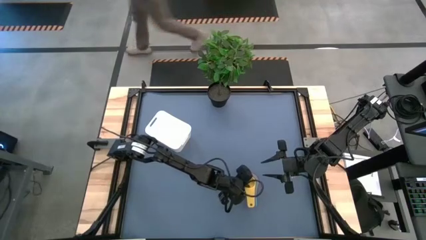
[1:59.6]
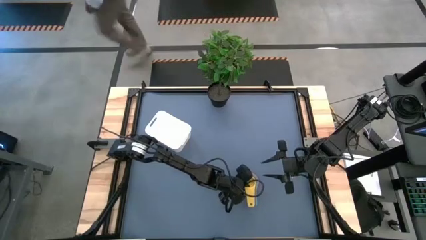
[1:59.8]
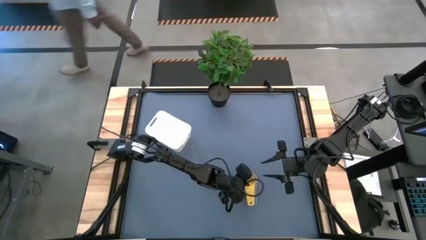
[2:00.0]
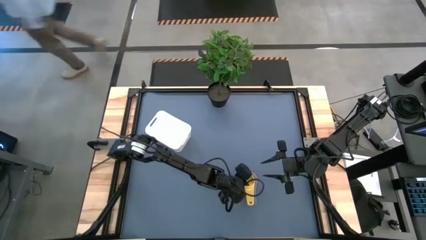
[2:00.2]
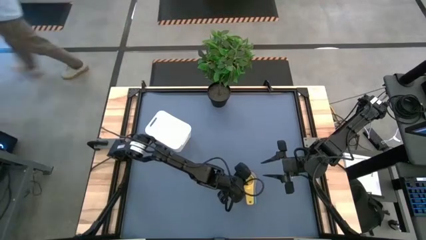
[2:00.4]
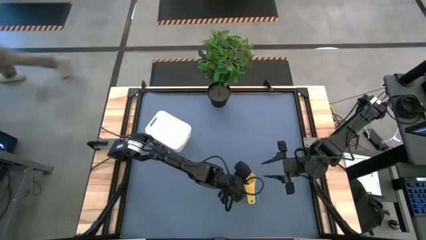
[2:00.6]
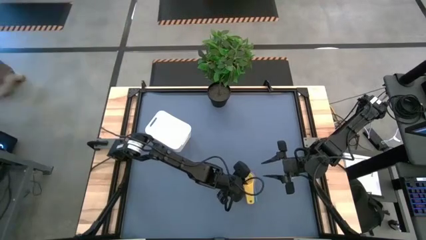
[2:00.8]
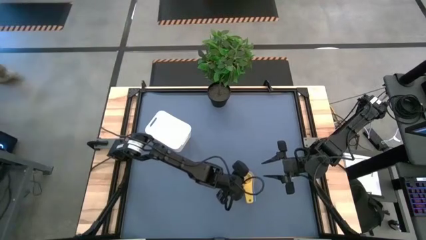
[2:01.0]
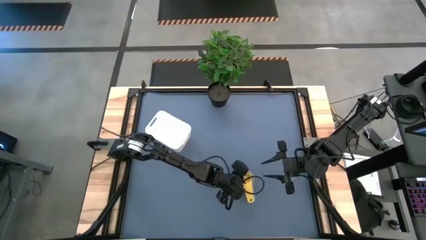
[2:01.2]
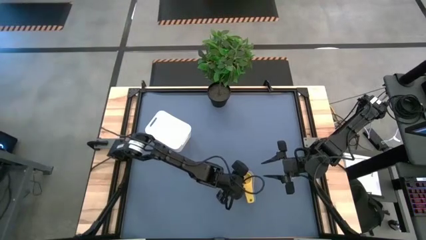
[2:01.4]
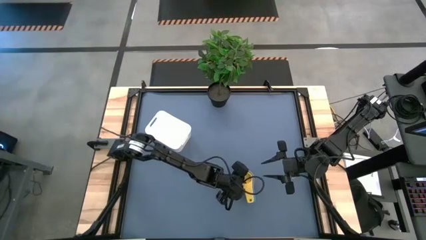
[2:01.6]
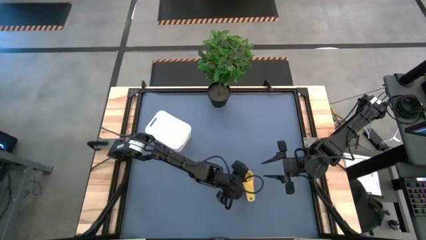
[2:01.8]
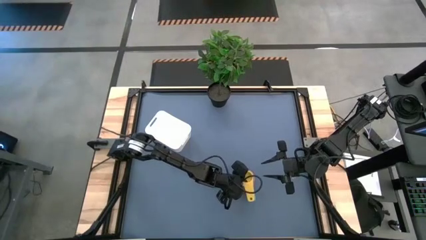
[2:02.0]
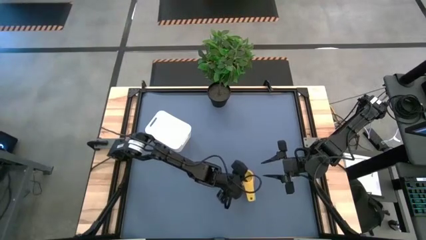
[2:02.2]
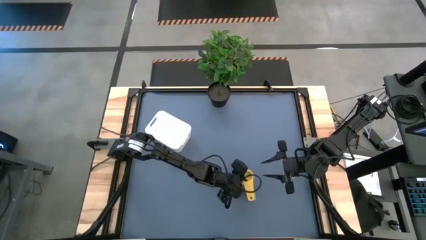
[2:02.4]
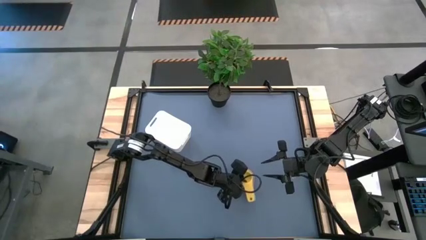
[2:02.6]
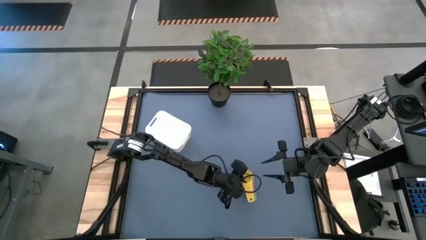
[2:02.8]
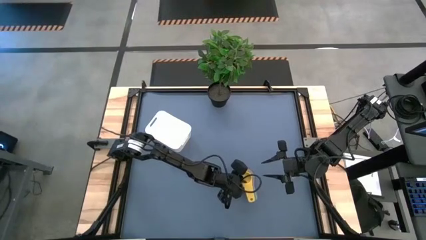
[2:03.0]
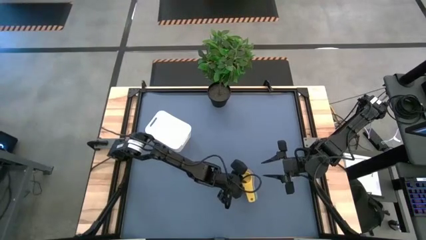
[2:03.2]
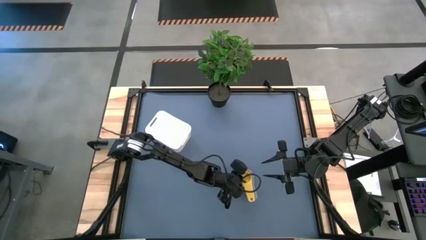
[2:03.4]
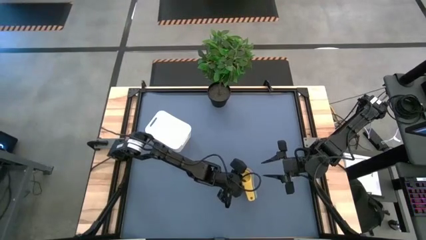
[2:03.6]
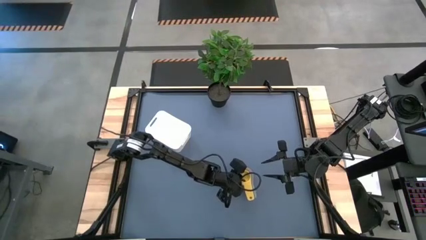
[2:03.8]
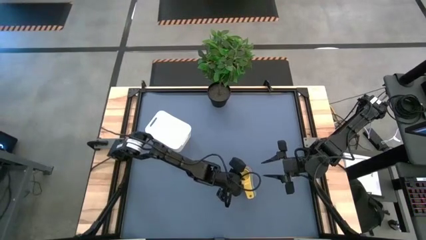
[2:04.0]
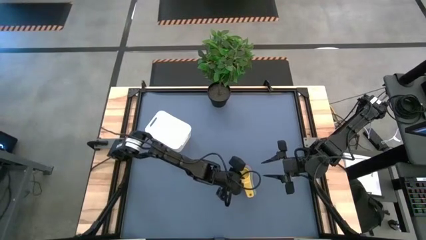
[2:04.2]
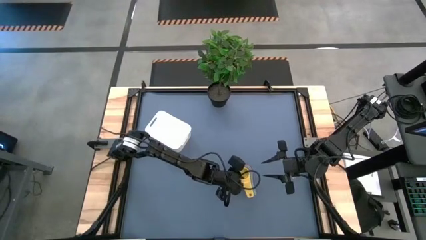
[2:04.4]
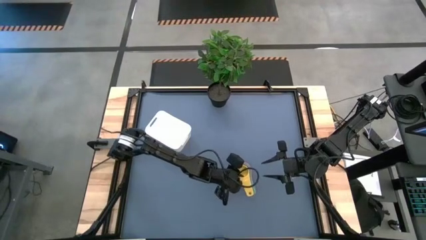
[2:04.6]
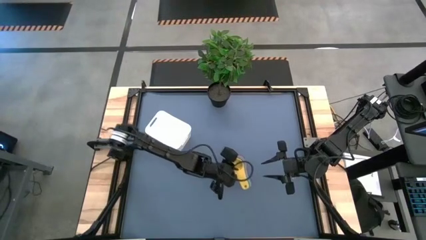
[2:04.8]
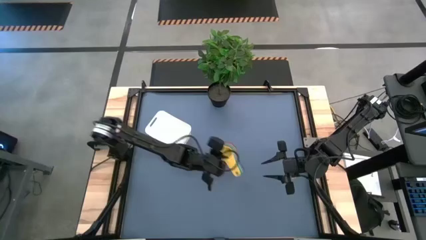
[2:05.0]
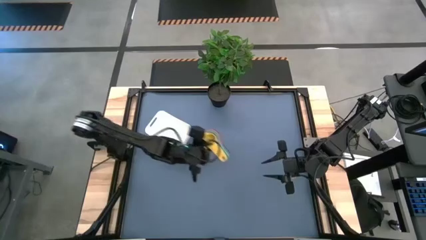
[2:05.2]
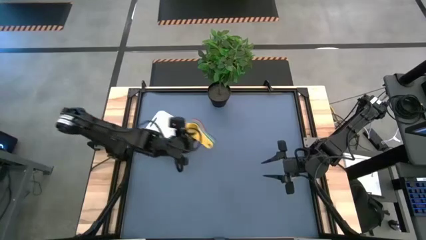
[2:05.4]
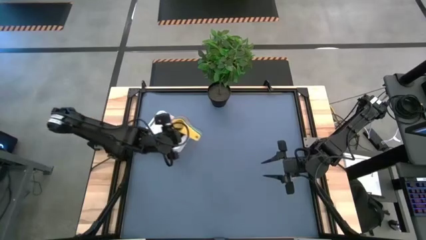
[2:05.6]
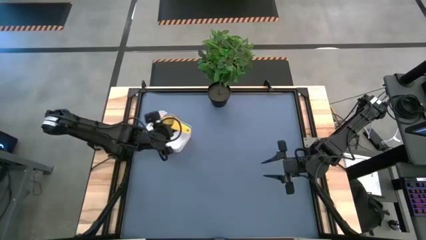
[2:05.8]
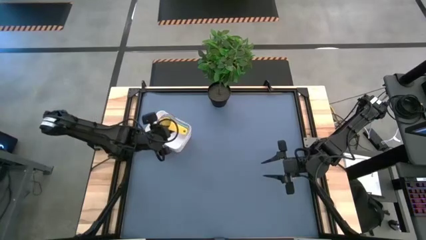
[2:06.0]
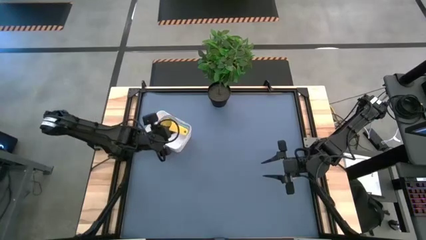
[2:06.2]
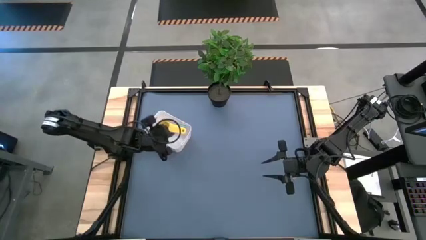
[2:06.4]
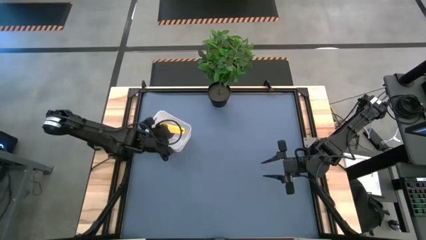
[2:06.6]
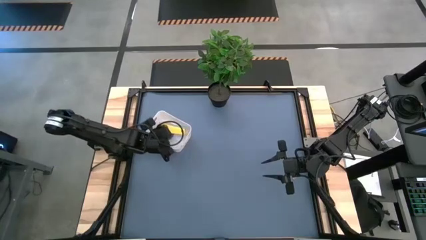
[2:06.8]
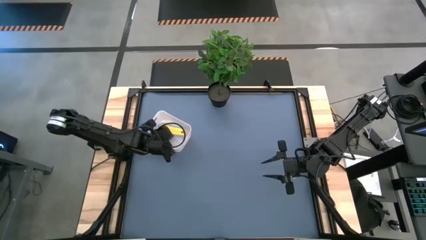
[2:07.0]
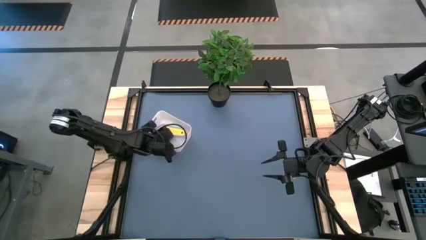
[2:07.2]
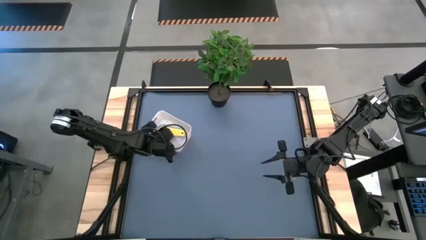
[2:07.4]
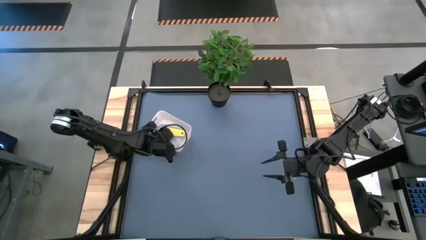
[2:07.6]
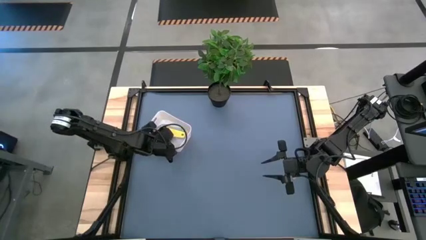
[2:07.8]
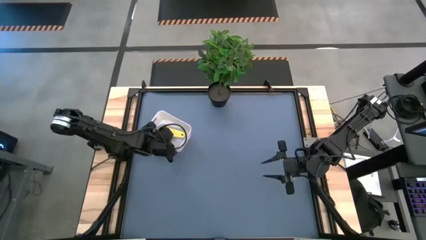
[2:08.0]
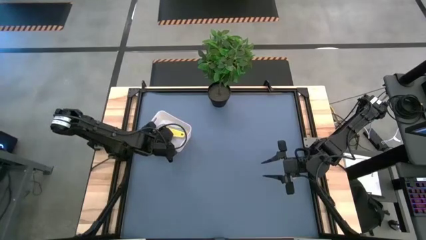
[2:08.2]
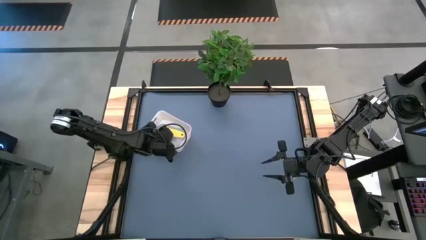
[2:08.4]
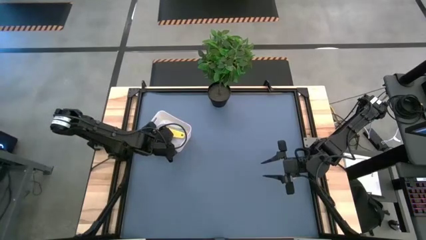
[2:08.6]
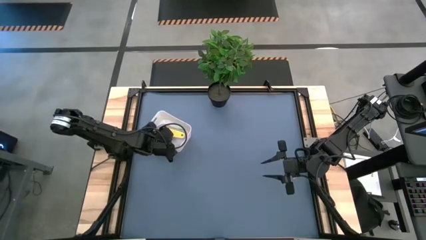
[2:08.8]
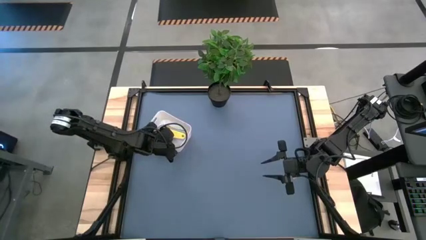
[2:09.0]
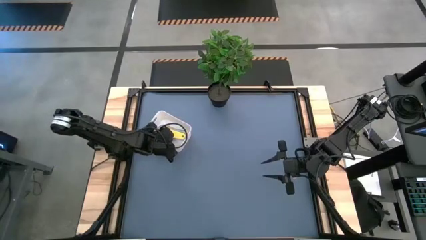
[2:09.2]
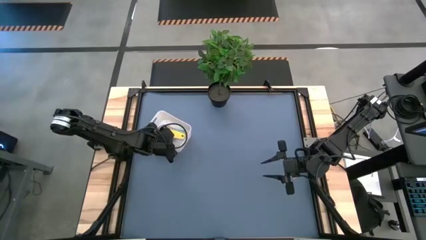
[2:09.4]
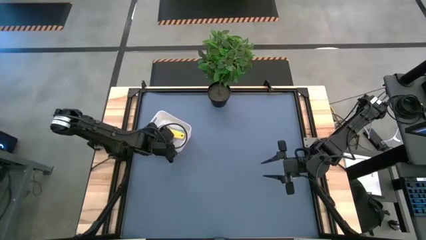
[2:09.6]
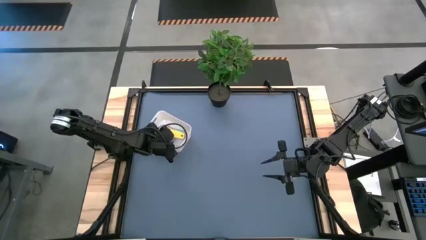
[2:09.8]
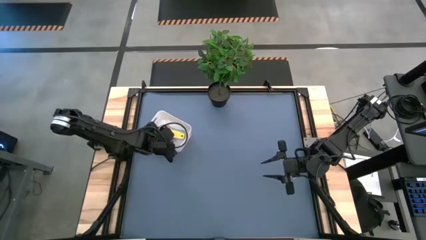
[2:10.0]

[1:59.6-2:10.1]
Task: Nest measuring cups in basket
Put the measuring cups into the white bin

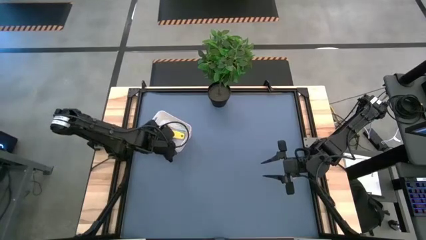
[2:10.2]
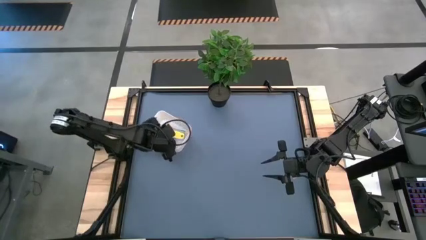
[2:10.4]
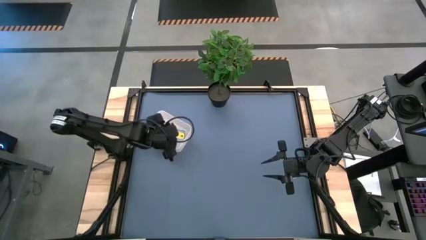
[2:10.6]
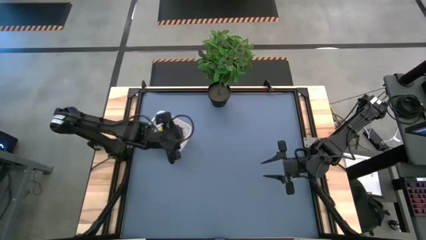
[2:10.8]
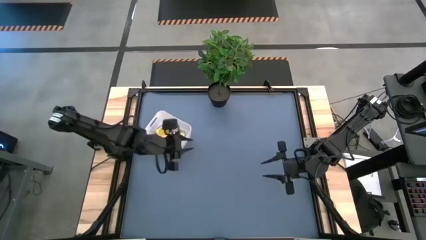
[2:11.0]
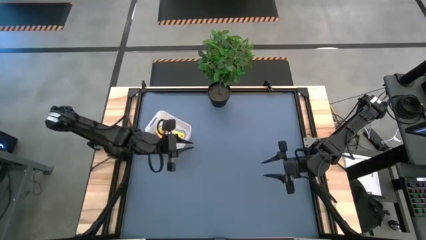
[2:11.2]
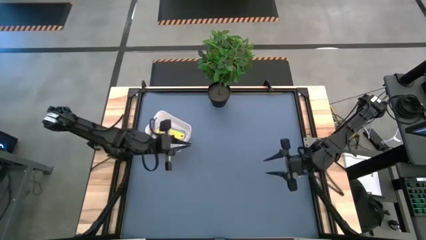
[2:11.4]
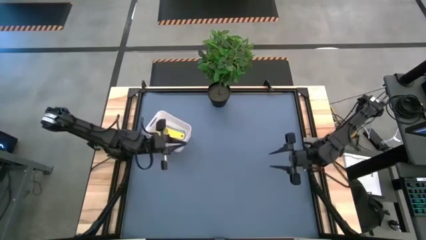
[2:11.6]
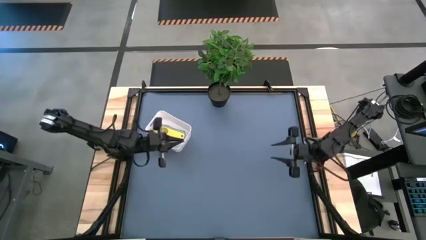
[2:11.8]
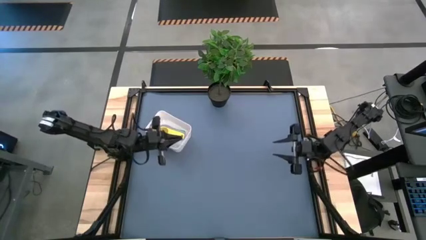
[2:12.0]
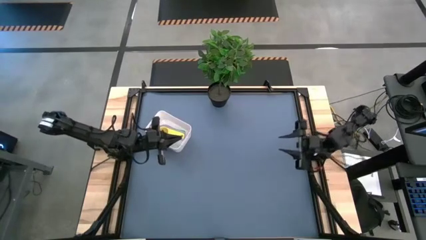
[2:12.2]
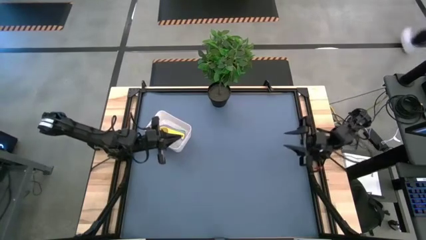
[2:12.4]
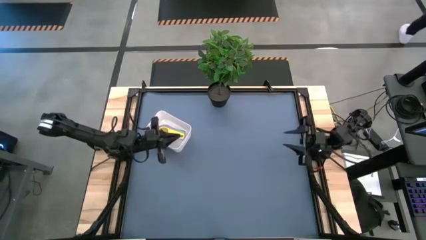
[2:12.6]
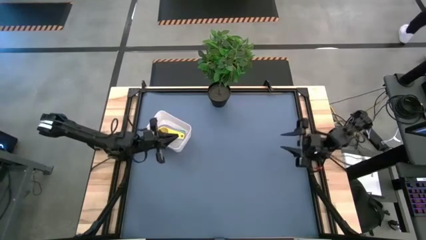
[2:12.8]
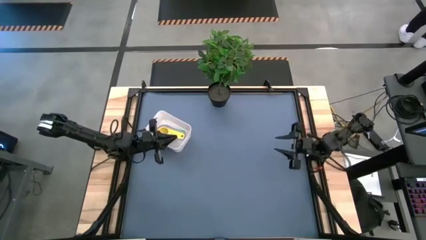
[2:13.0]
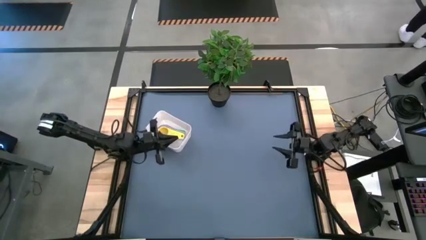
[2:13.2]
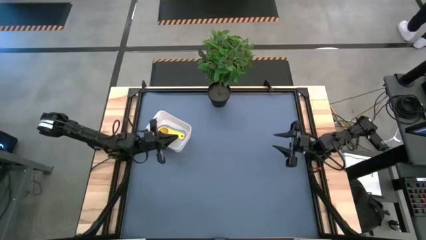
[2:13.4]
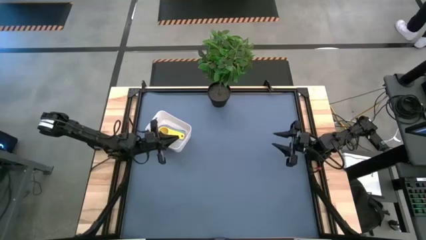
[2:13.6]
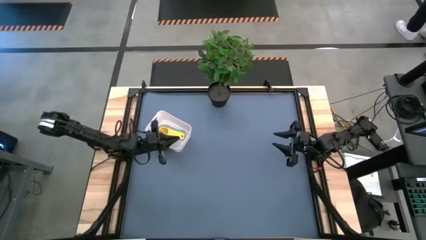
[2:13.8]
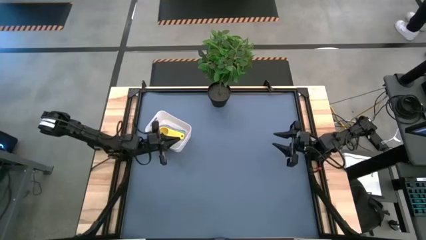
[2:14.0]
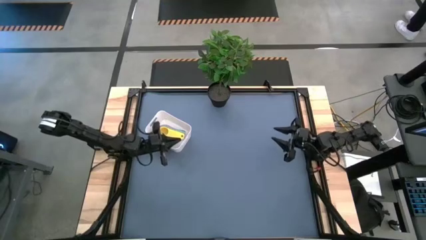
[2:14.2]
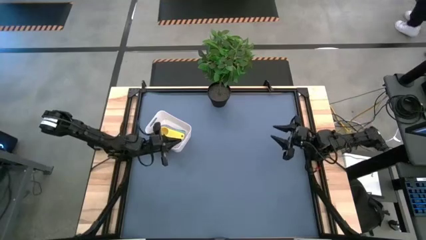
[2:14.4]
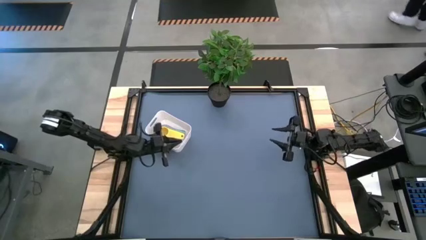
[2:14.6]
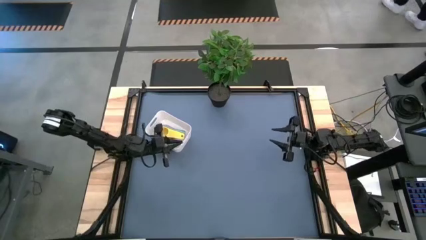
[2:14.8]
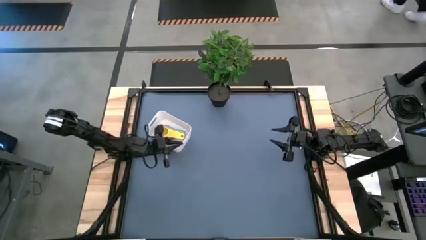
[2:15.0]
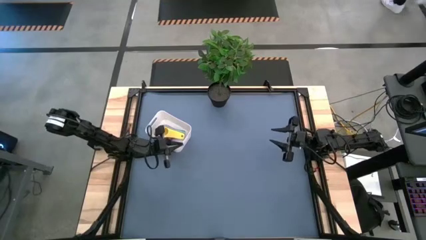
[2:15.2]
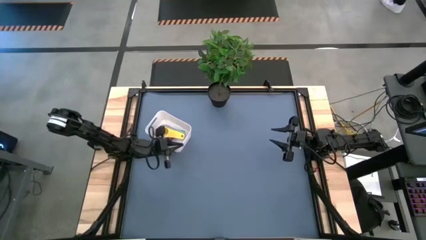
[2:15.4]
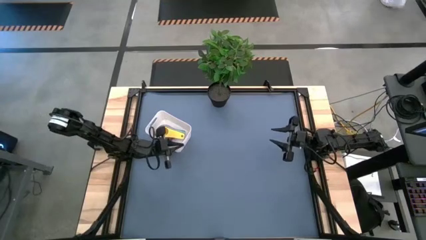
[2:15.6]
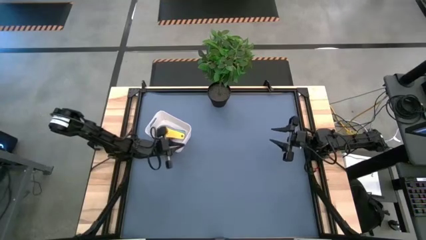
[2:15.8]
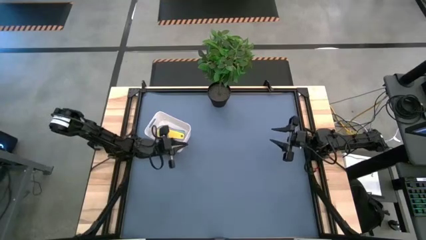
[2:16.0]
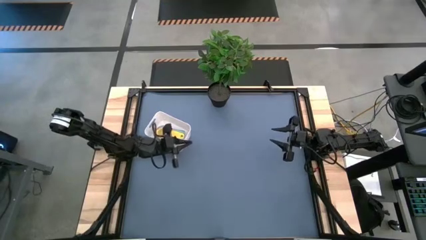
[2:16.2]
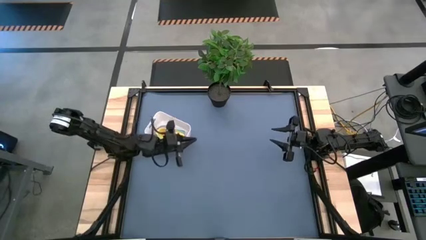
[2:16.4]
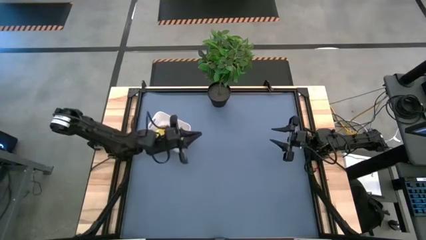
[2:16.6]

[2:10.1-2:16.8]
Return to Home Position
